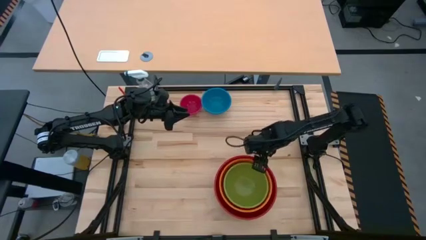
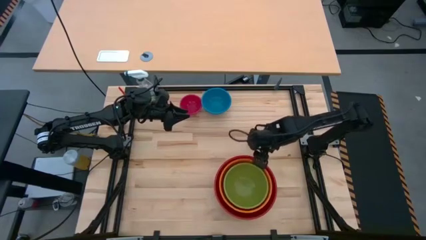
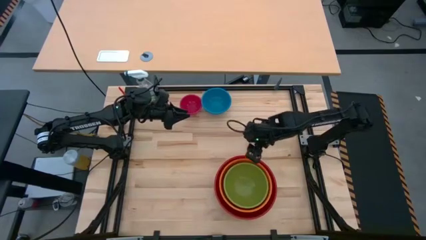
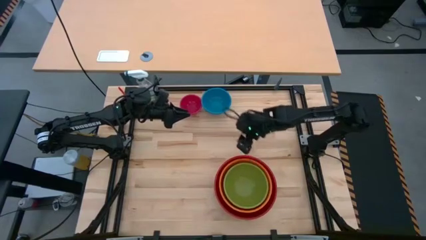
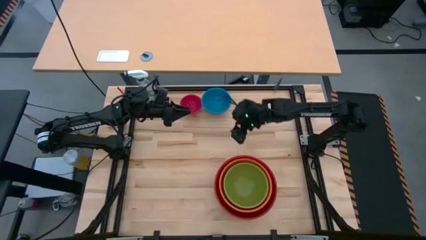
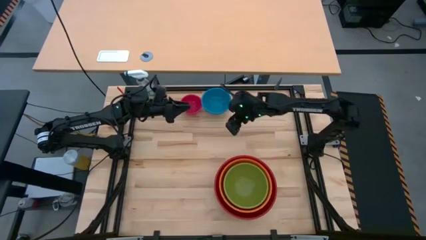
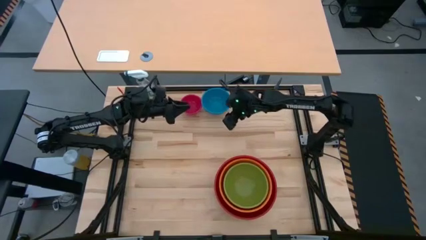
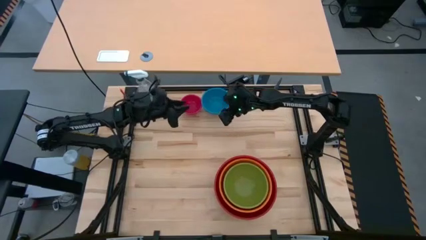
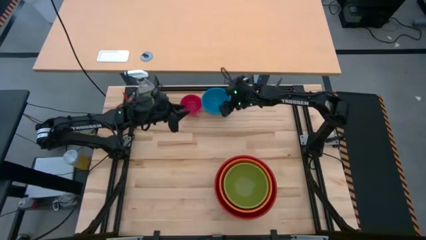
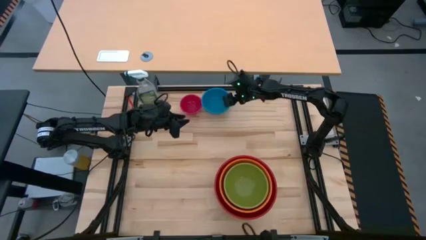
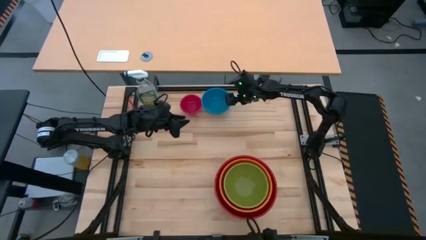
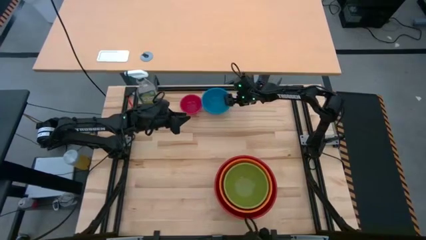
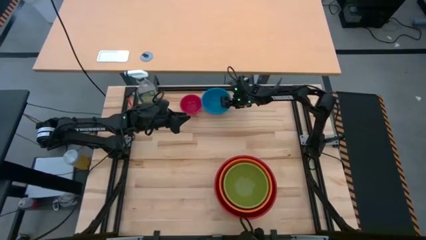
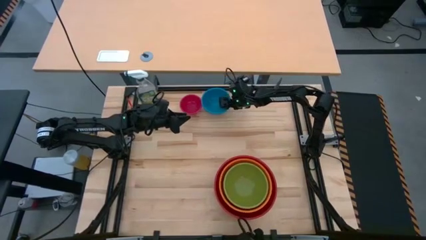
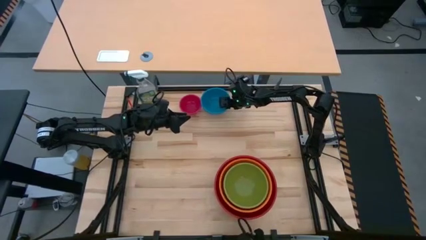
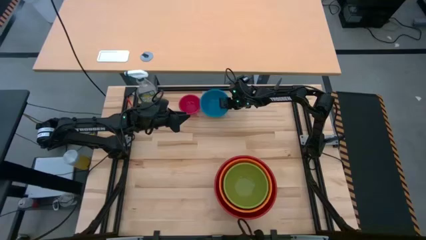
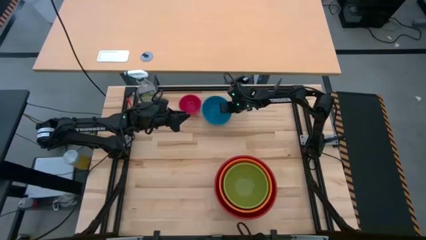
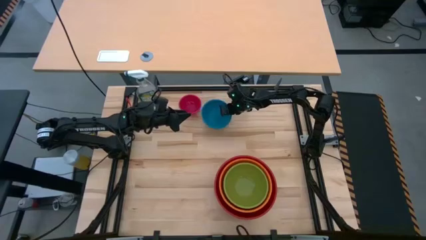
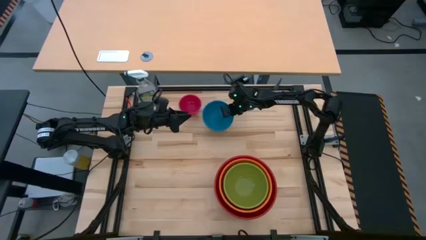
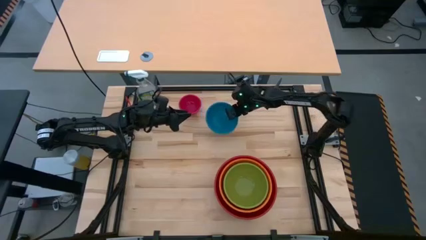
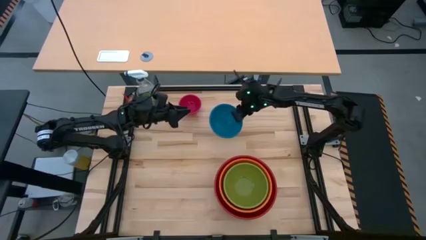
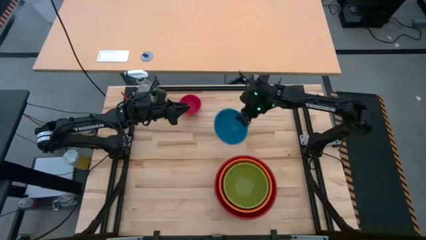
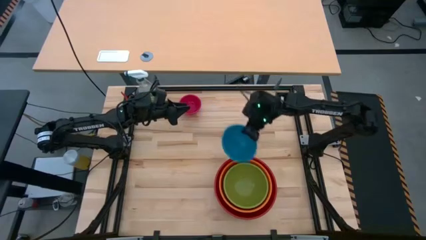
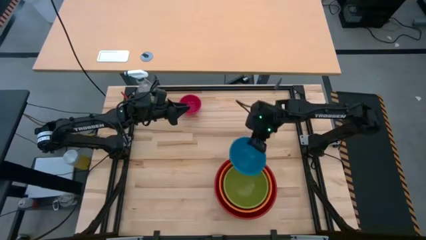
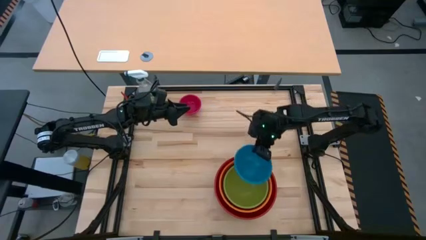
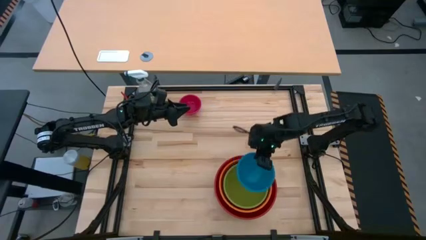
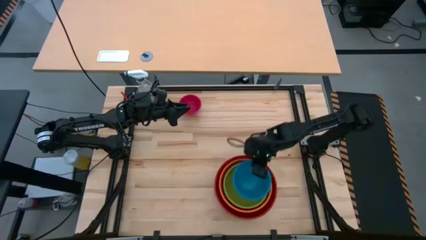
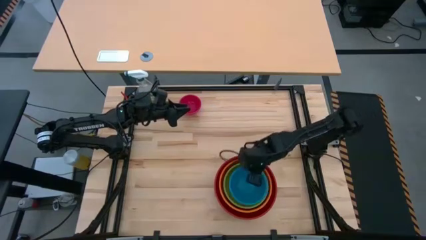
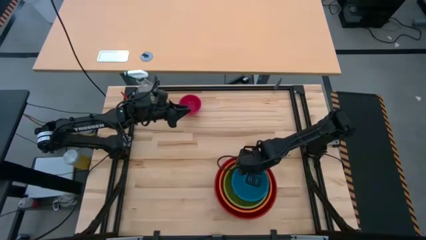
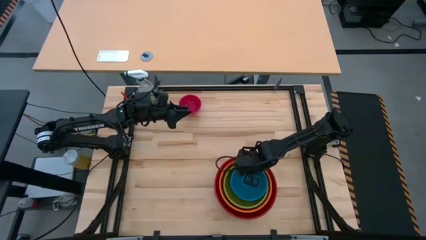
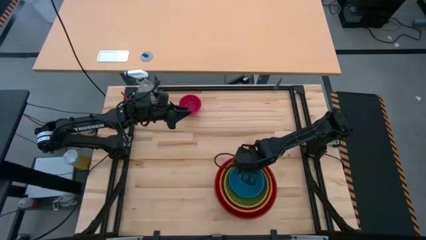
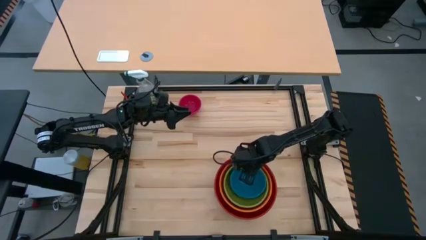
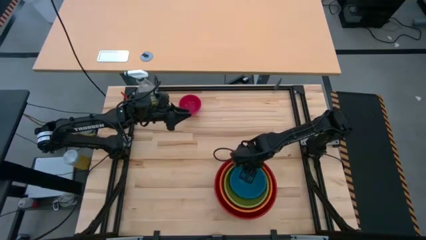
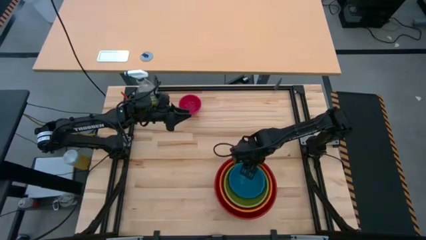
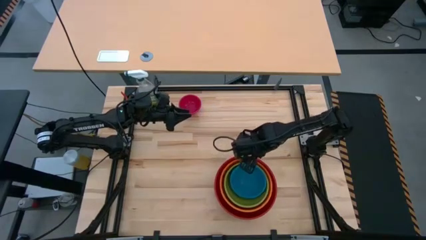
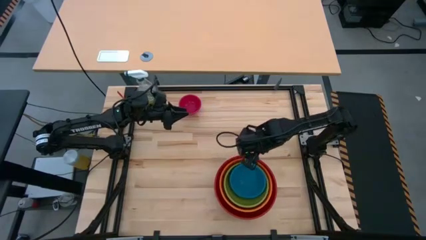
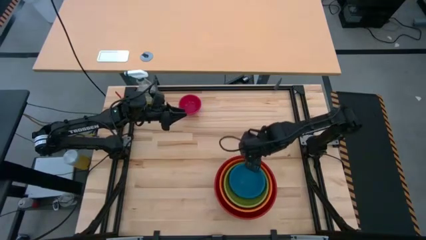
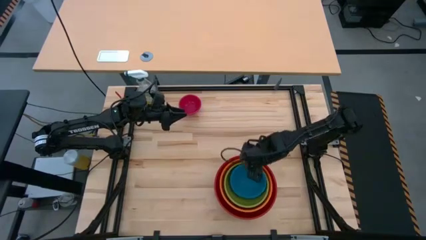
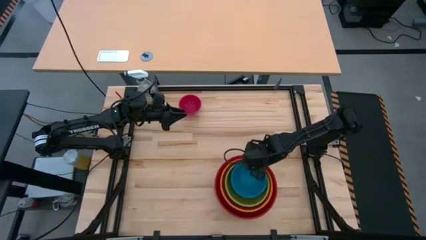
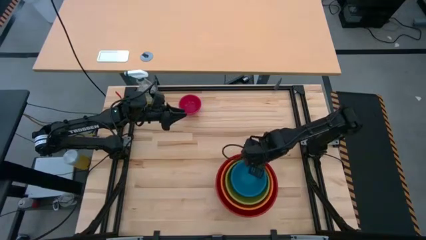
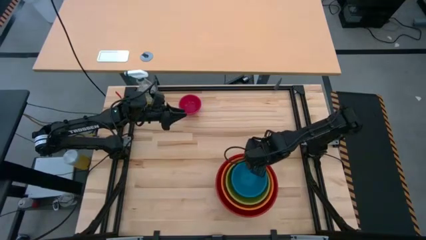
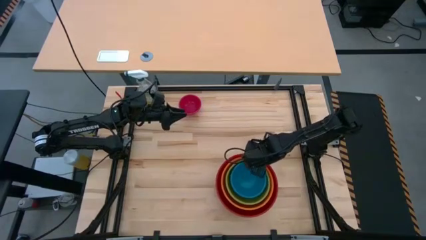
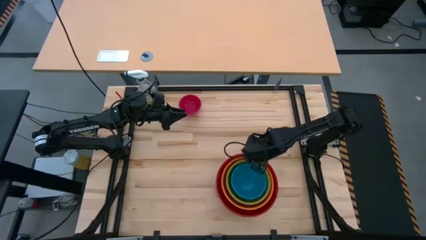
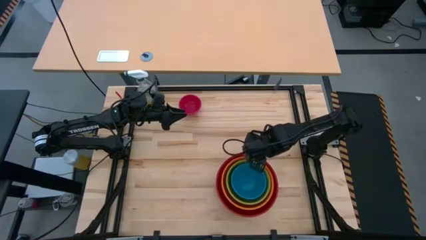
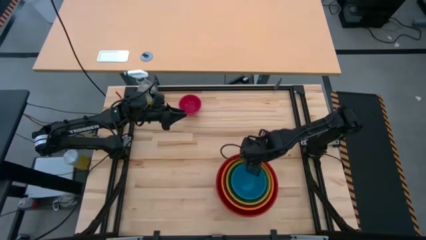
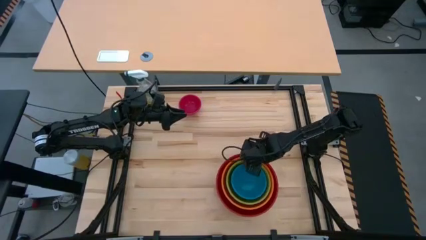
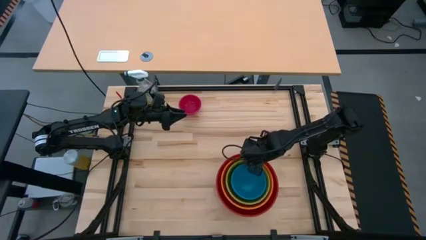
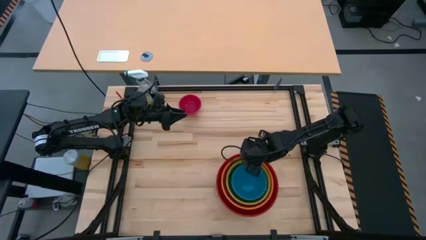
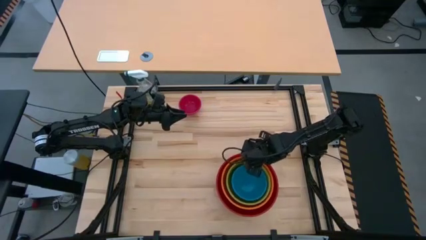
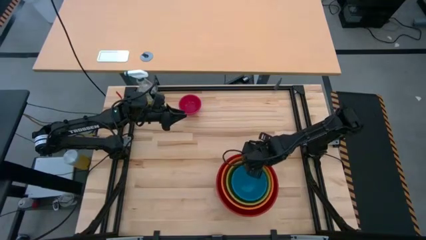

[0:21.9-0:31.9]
Task: Nest bowls inside each other by size order
Stack the blue bowl into the green bowl

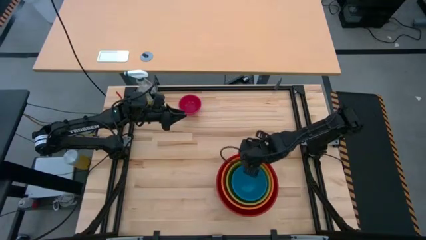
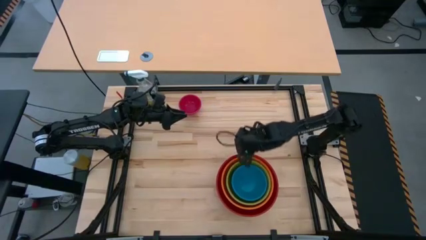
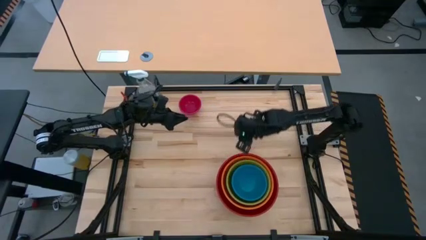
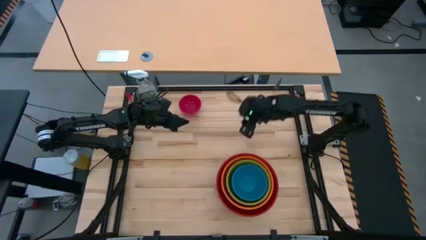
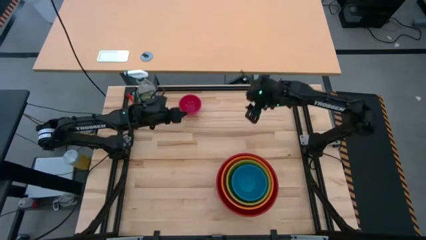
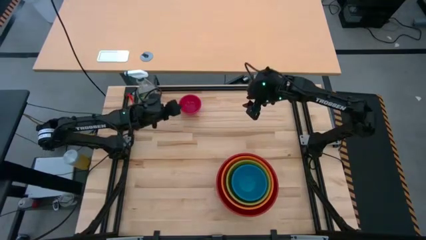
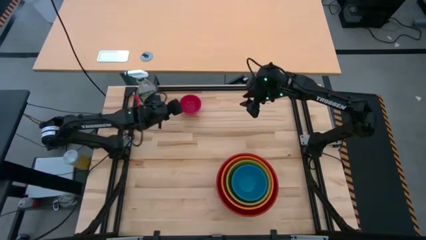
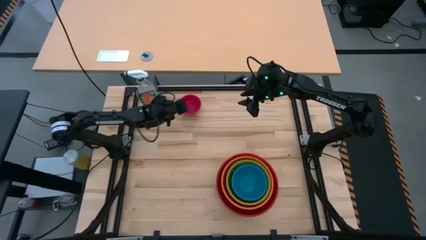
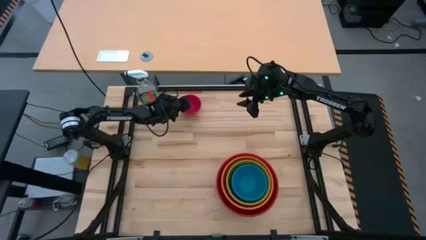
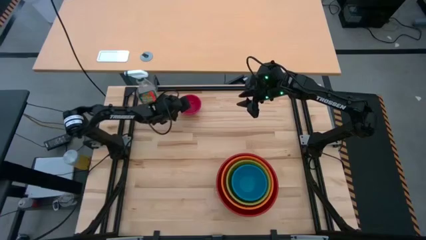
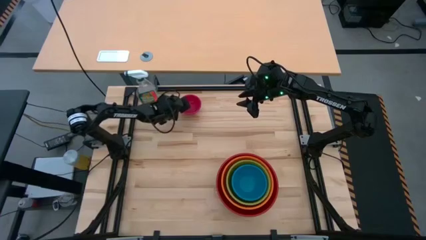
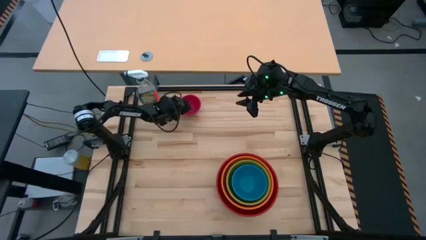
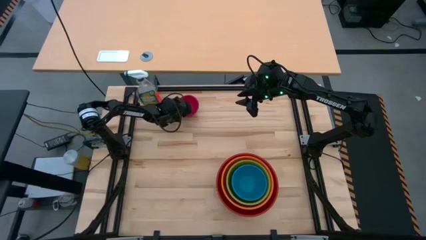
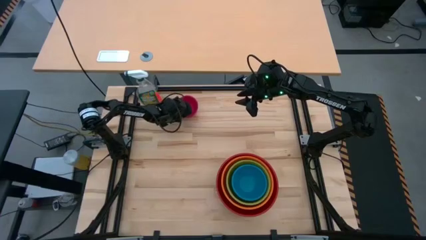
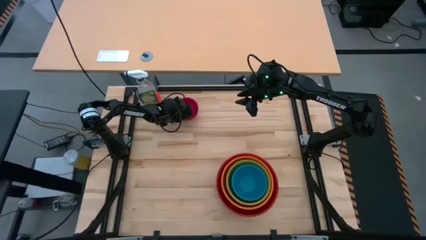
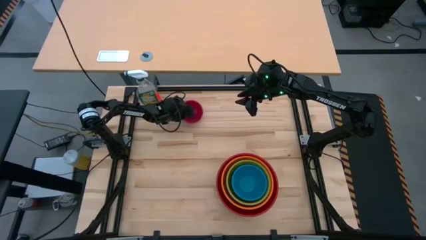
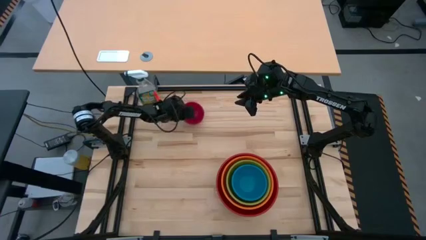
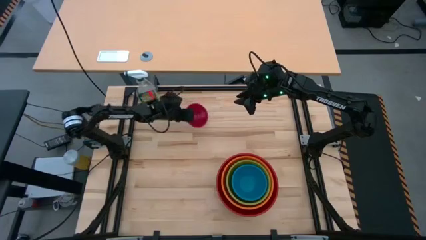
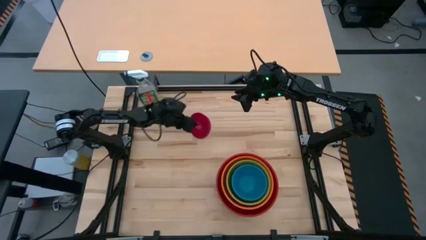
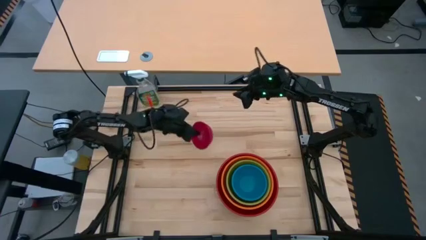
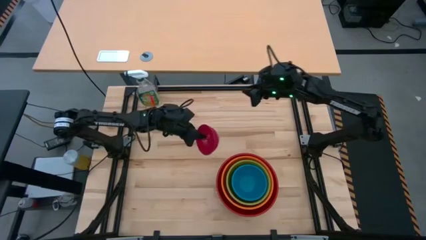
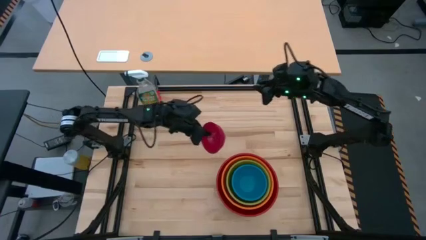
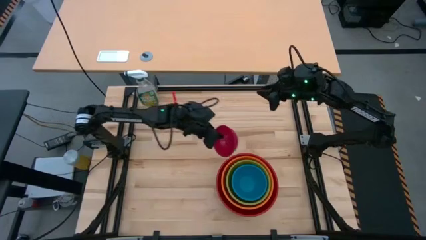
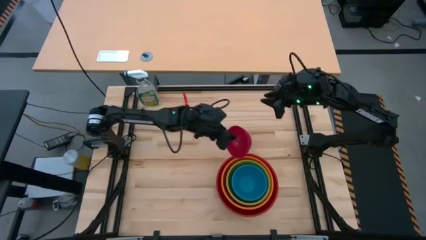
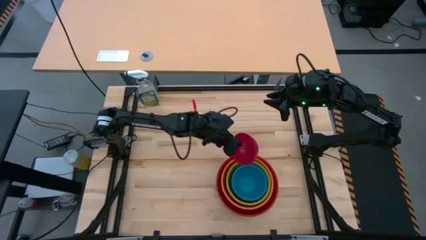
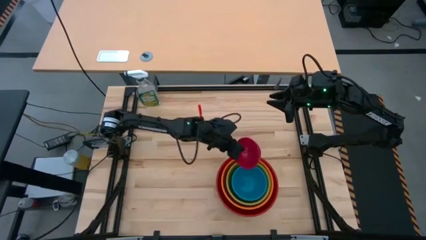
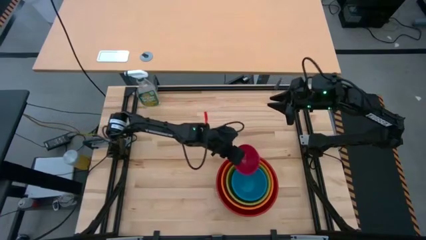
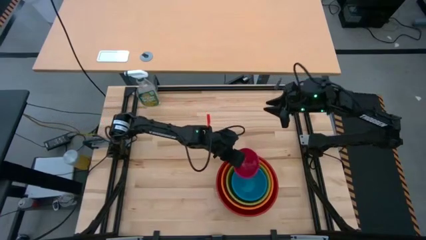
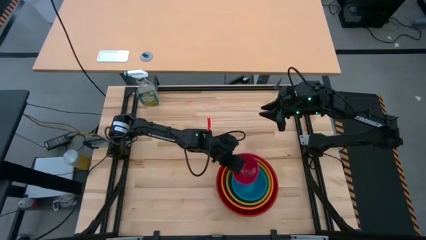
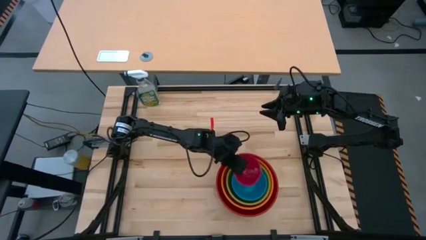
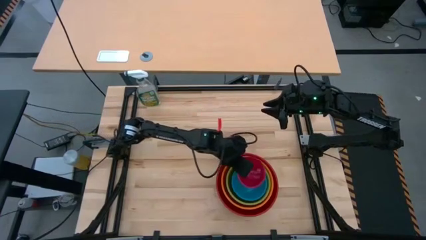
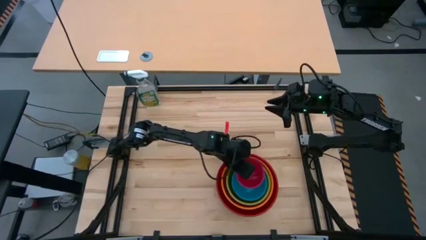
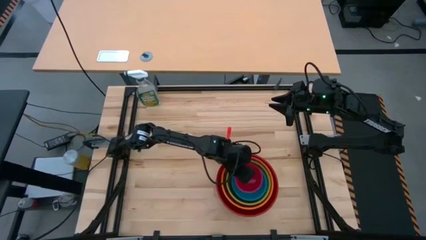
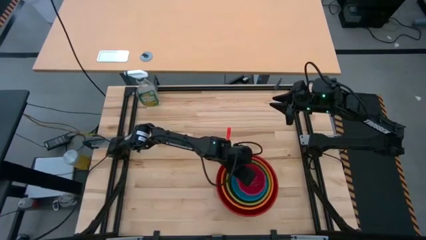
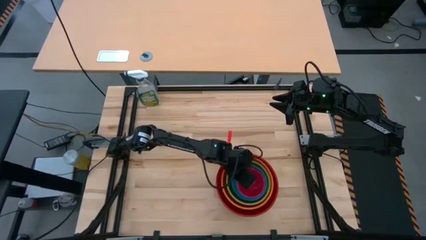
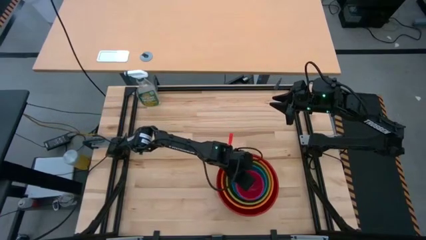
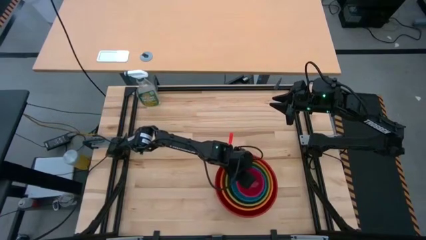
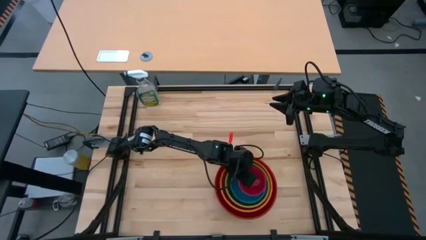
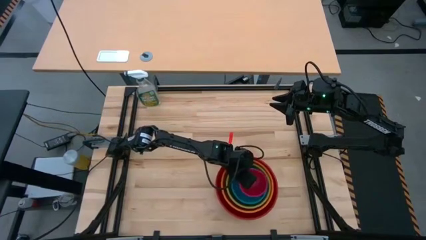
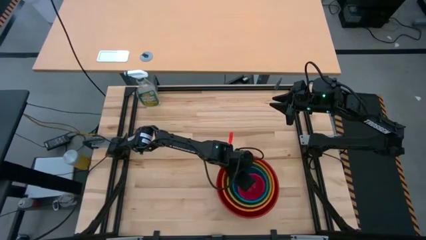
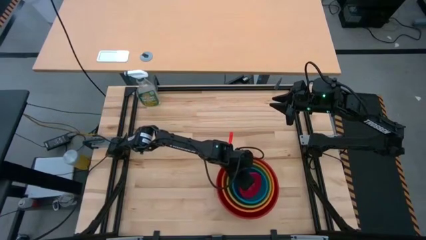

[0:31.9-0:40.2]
Stack the pink bowl into the blue bowl
